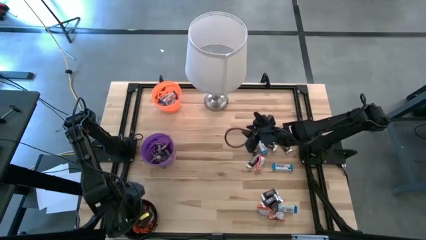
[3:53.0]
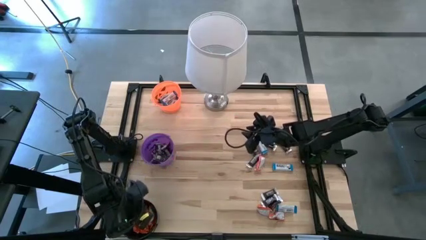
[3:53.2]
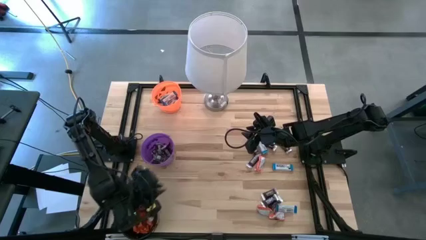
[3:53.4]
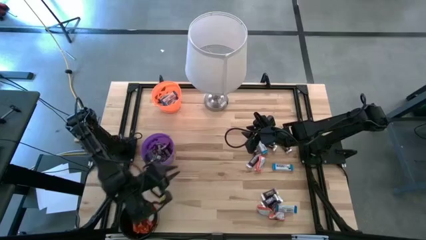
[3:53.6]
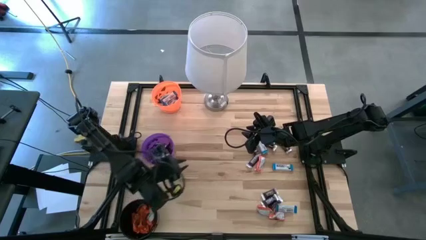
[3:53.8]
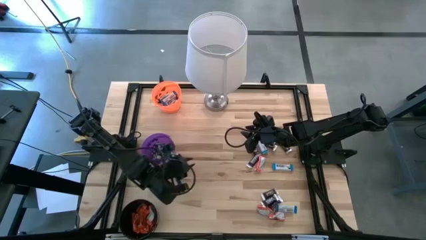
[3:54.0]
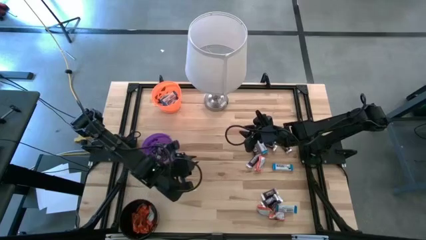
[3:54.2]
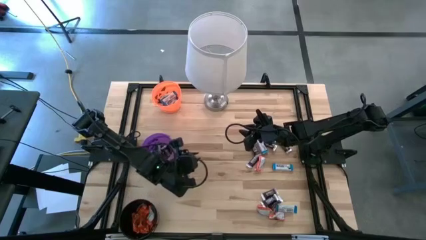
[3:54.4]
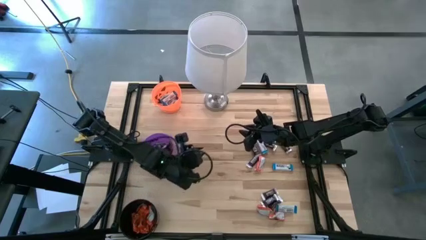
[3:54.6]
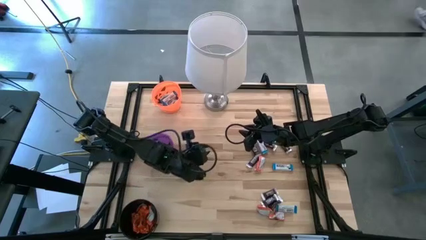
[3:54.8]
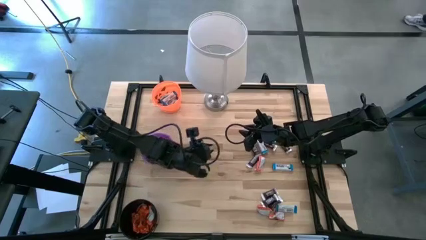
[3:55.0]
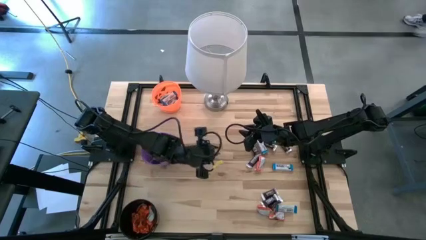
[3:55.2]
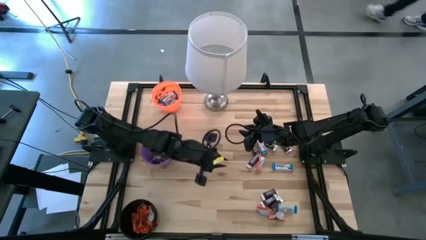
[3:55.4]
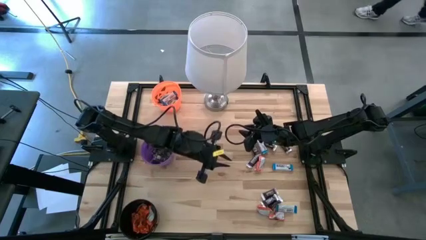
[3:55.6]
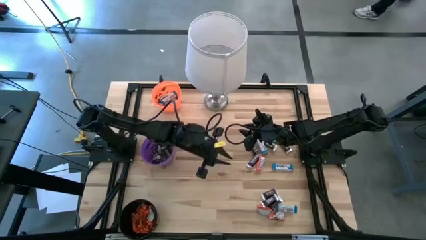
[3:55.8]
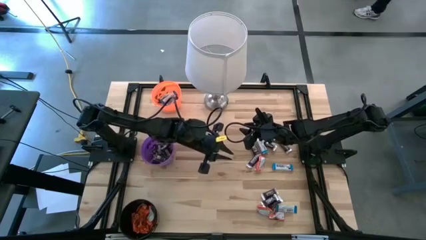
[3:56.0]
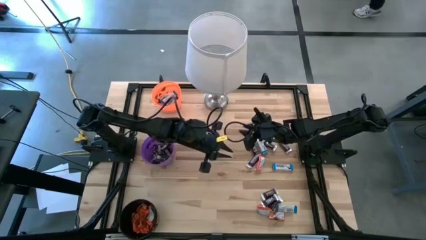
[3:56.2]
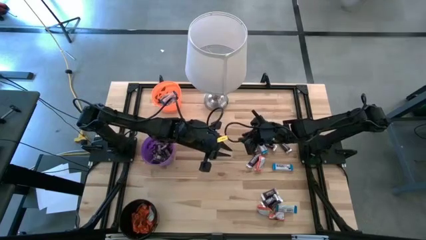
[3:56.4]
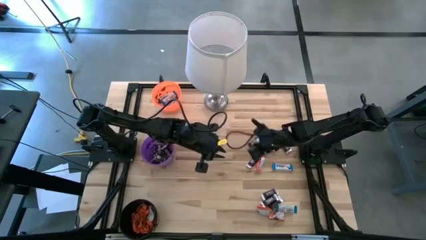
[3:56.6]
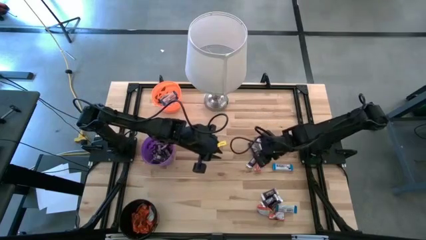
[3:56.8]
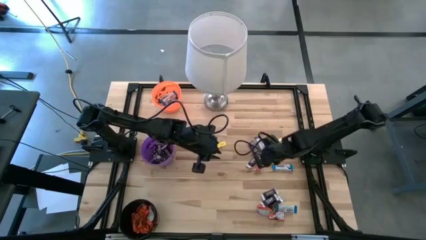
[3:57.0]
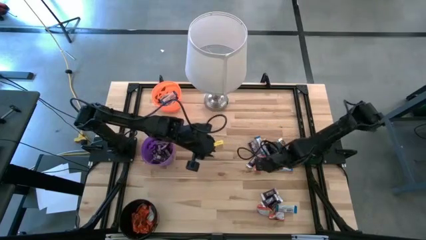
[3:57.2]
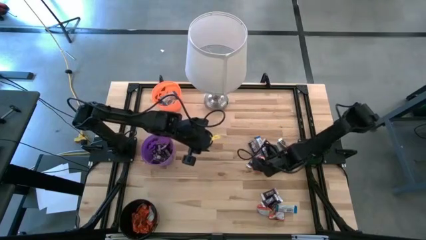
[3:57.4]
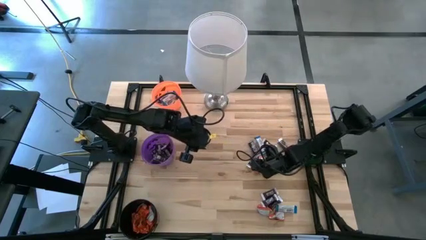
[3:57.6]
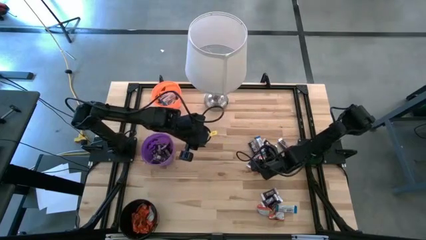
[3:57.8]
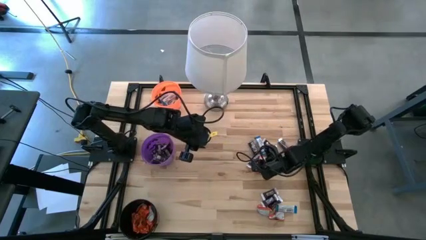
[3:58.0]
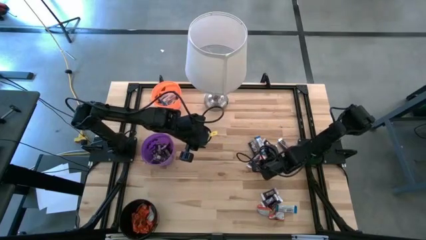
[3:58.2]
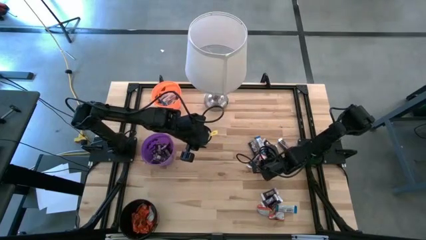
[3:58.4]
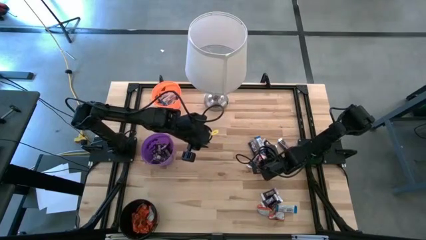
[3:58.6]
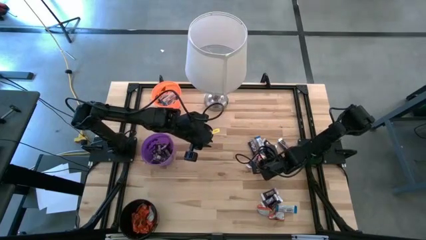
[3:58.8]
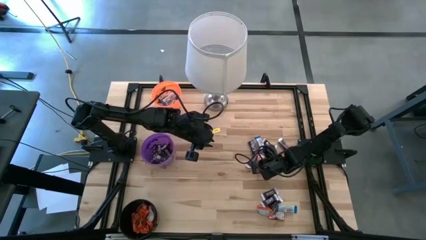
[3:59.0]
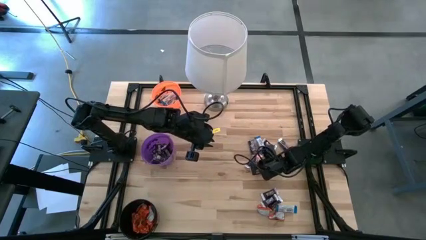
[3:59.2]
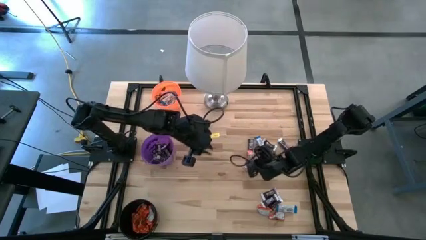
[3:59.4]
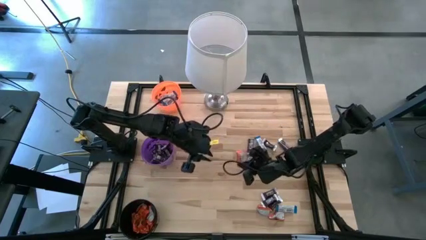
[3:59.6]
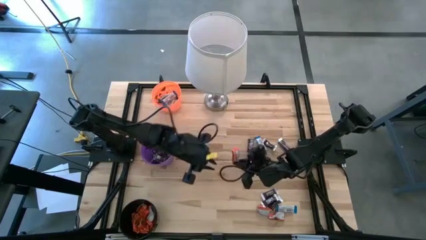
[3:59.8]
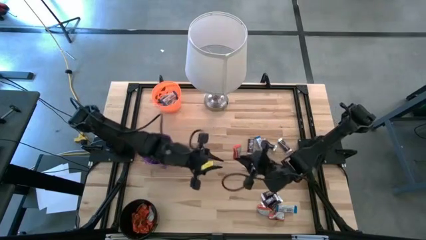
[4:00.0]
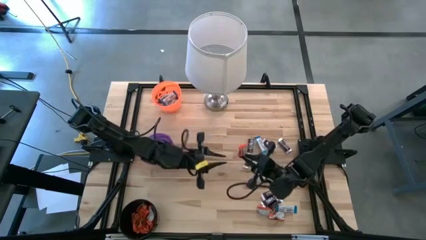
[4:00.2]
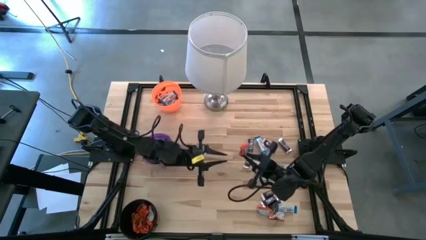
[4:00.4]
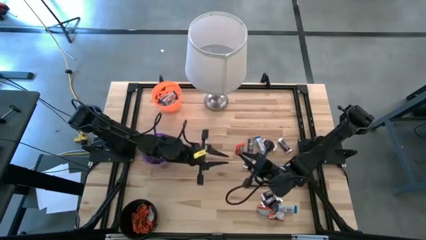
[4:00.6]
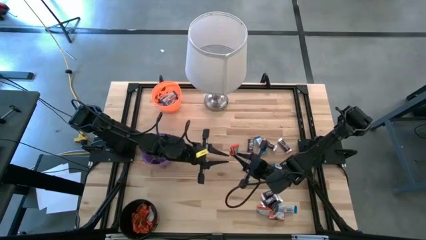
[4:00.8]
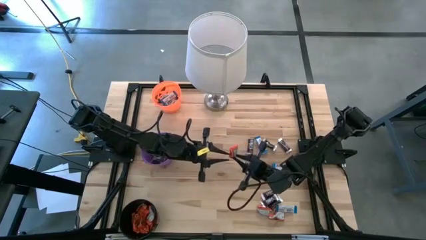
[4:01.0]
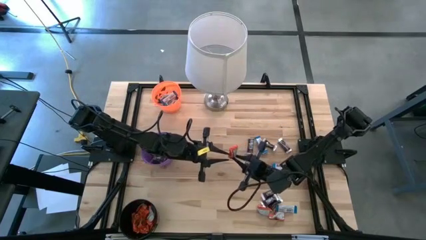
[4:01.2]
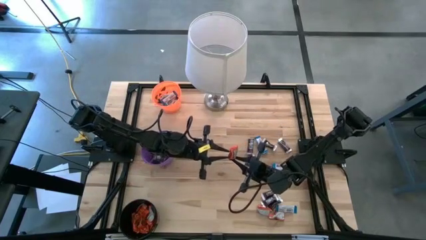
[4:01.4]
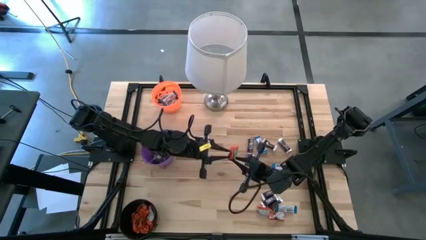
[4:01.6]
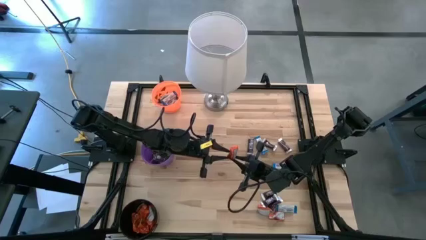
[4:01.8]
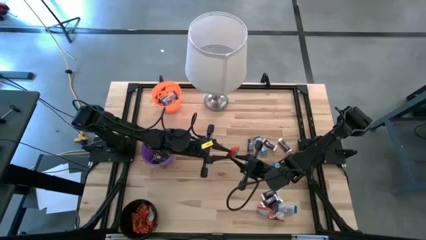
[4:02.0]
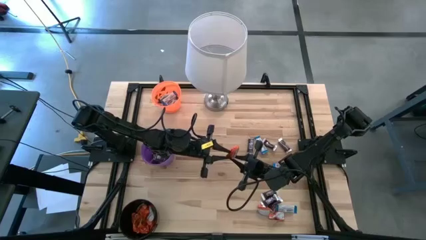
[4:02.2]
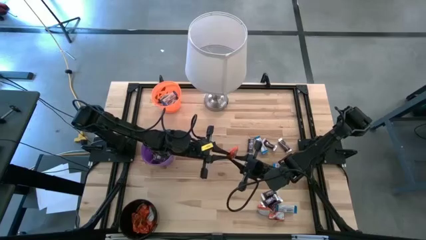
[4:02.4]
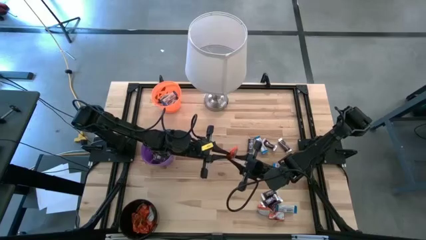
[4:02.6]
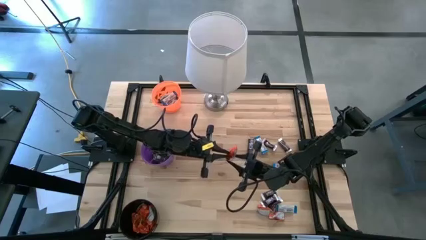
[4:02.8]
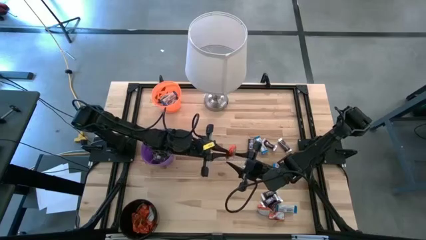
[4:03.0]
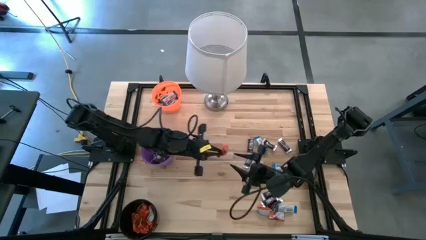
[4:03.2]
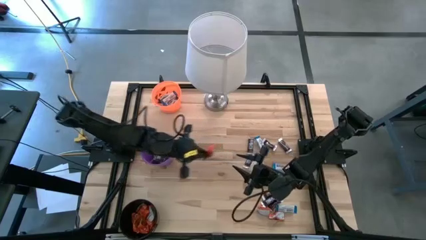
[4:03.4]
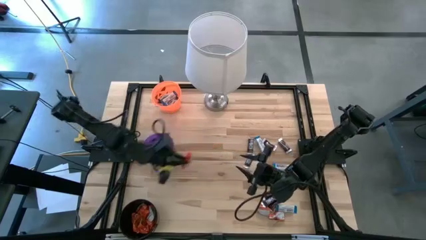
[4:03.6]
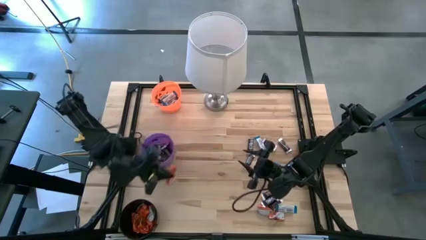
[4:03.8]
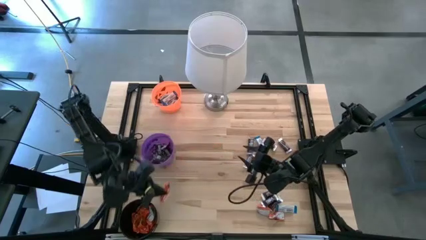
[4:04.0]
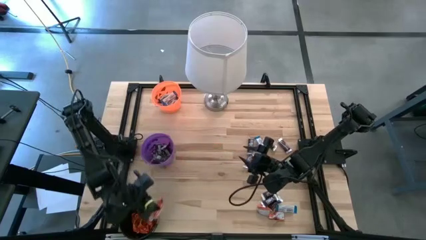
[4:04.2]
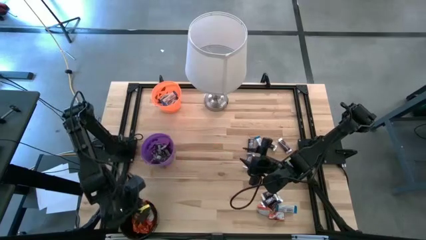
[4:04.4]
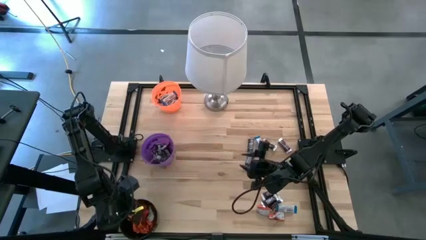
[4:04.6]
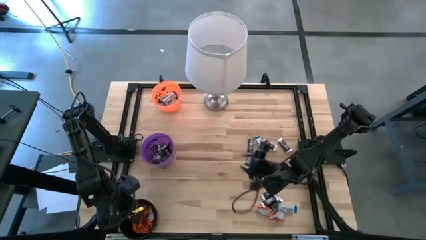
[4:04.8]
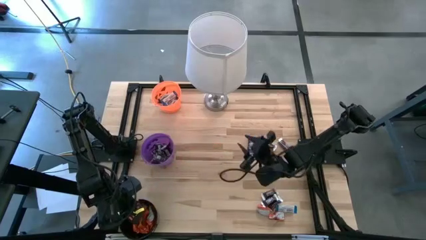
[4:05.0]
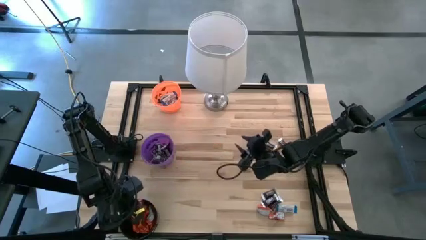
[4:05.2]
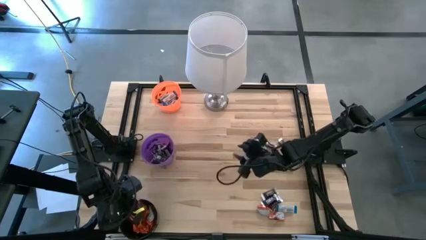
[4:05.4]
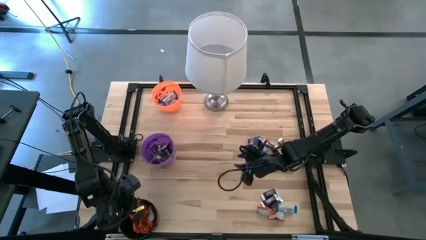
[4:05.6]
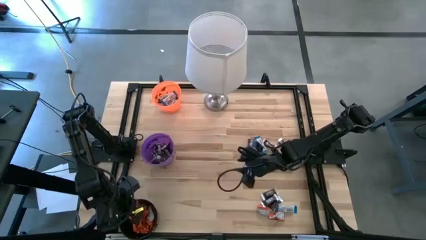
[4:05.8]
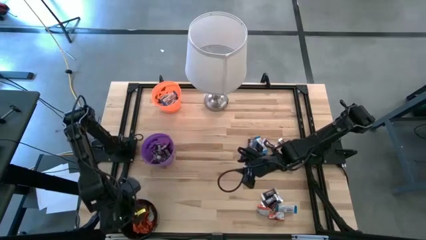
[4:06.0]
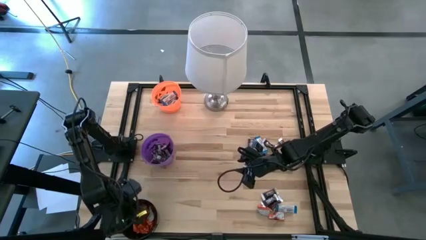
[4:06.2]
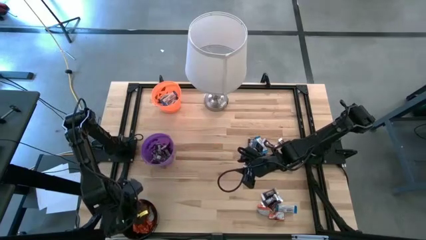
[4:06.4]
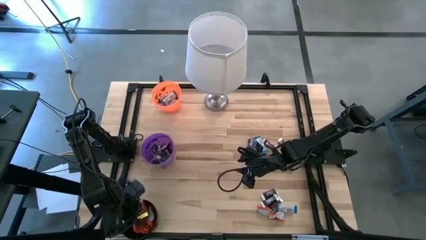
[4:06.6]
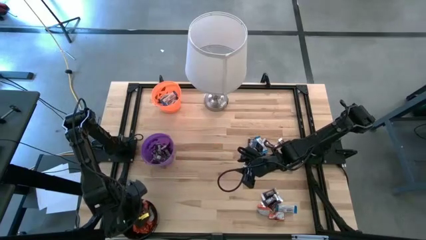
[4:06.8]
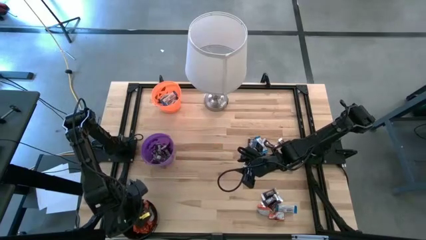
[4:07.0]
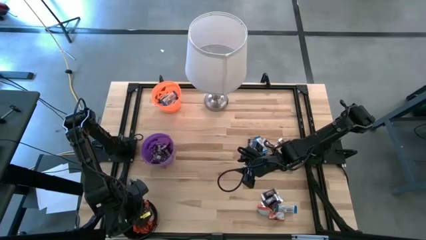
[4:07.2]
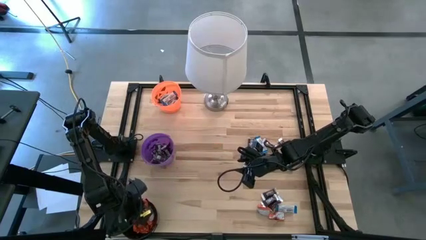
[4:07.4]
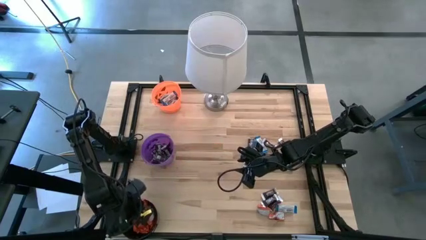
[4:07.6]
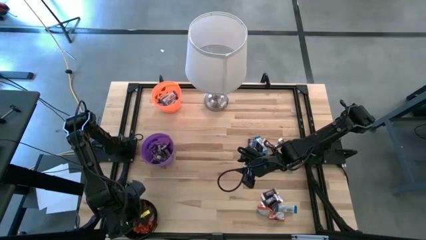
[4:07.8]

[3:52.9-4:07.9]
Task: Sort candy
Put the orange chocolate into the black bucket
